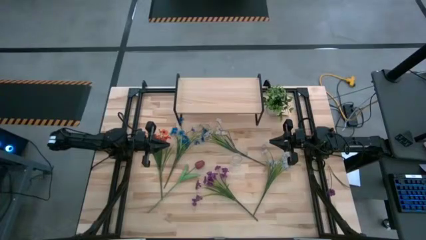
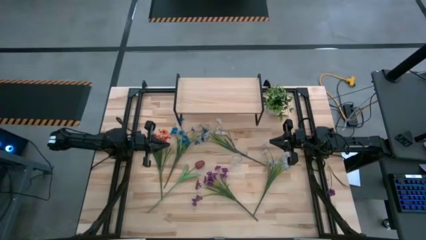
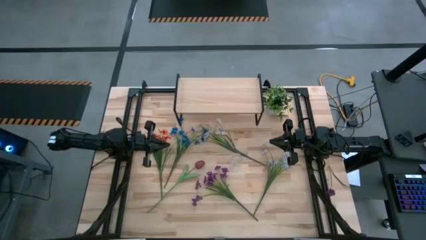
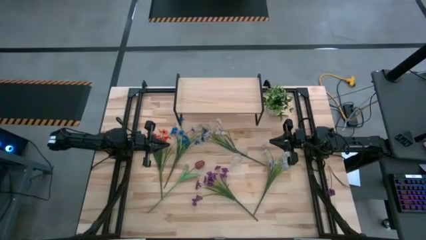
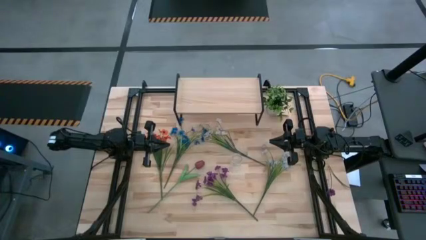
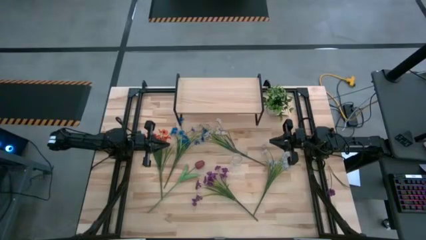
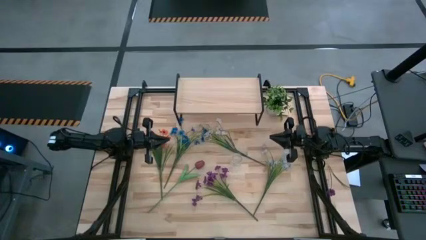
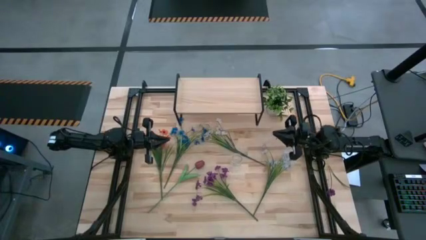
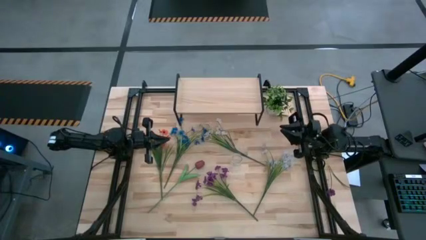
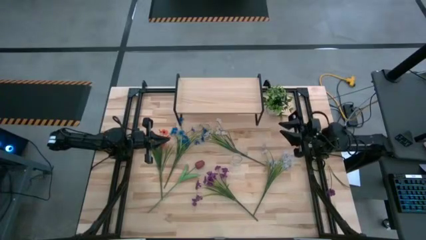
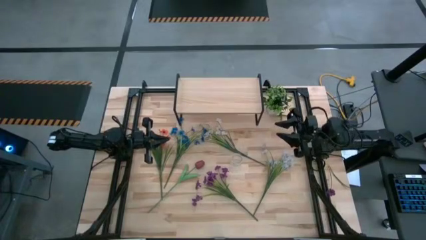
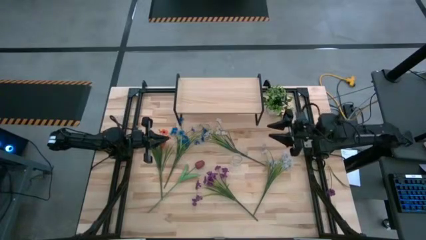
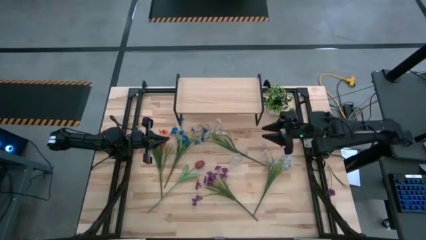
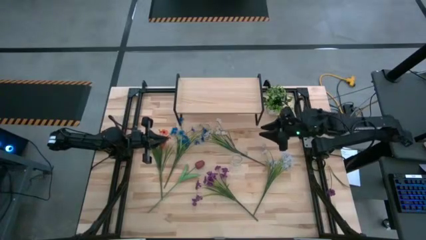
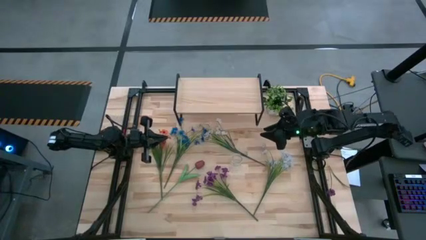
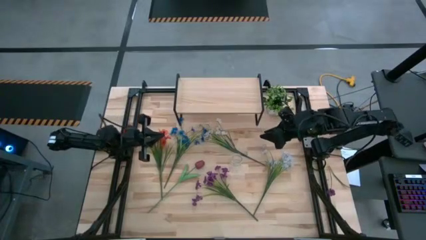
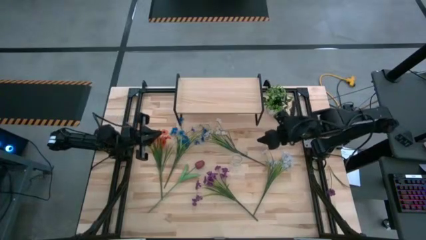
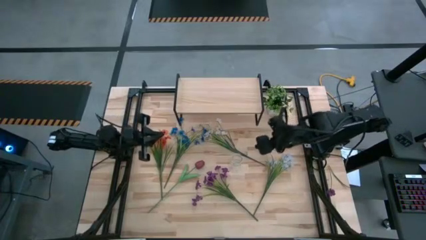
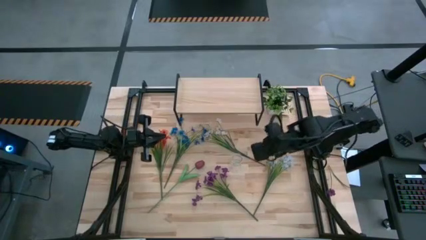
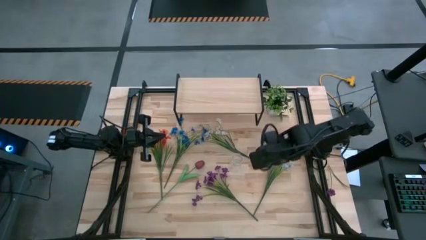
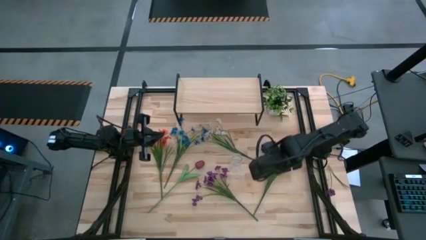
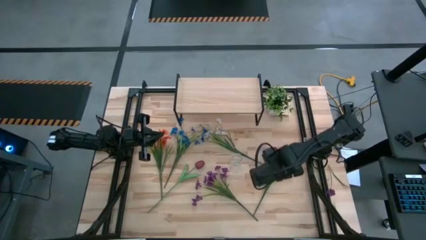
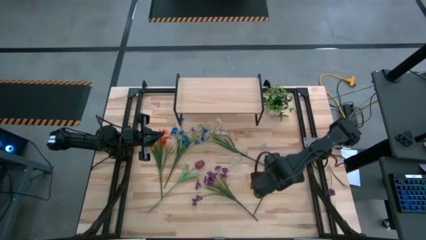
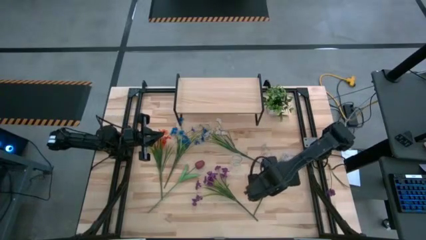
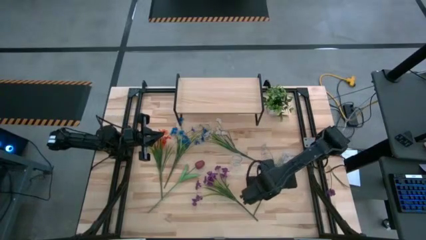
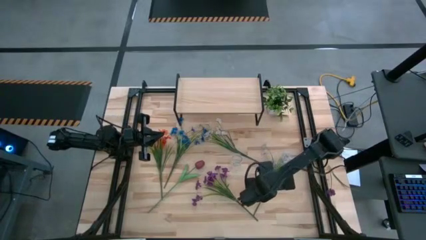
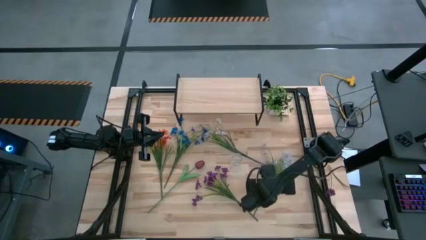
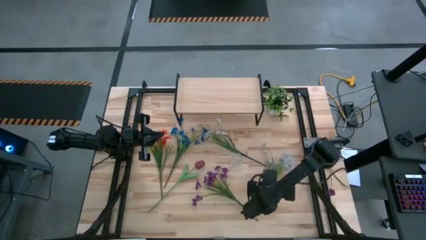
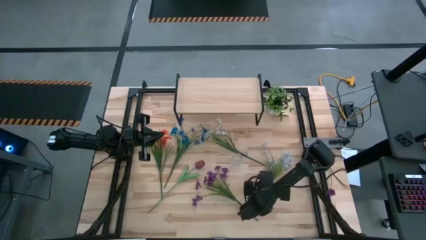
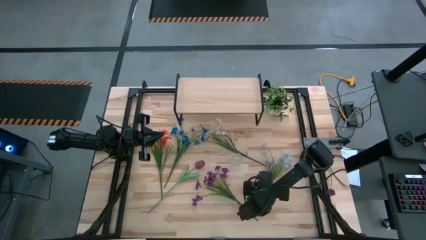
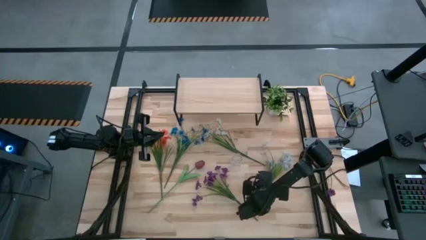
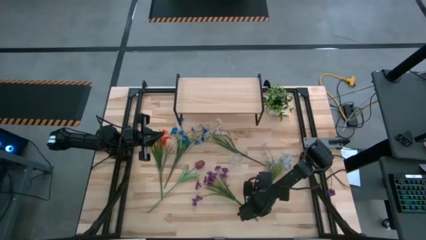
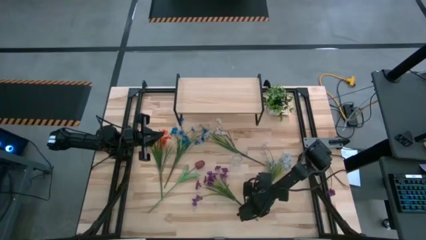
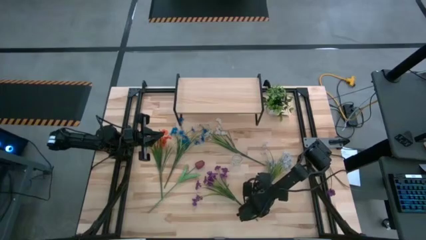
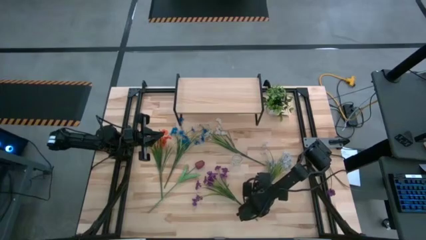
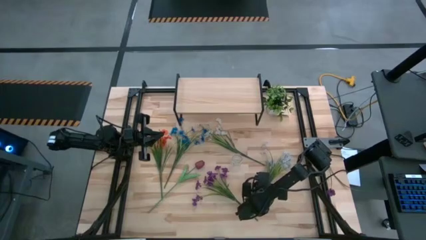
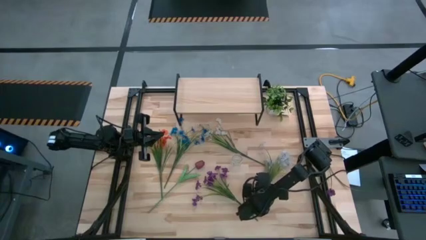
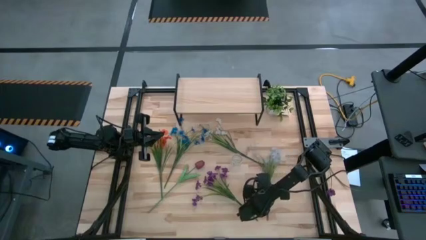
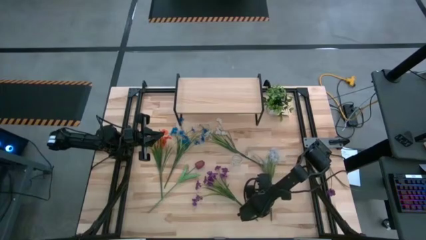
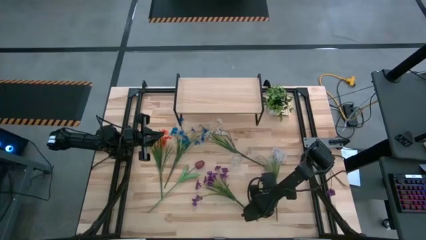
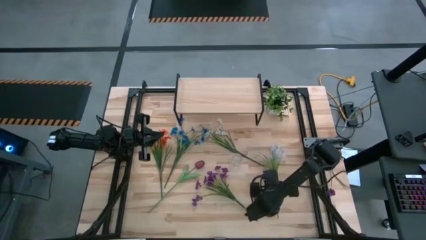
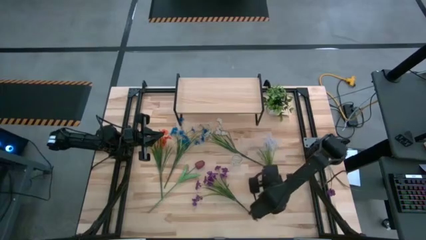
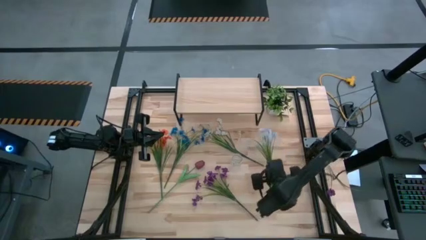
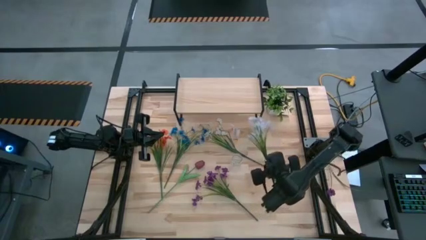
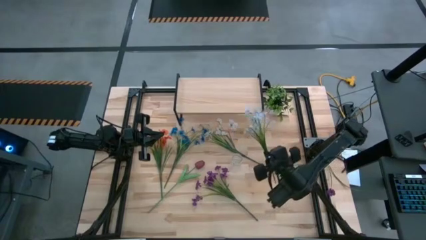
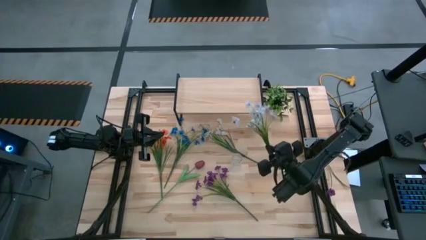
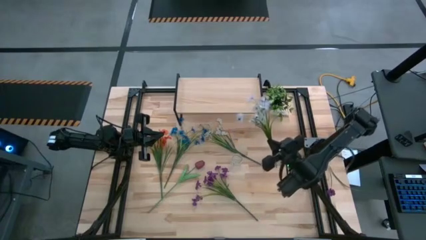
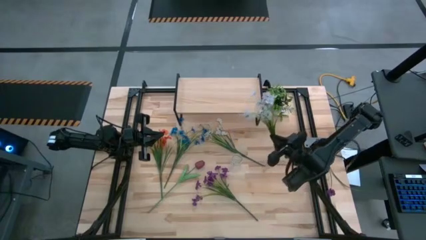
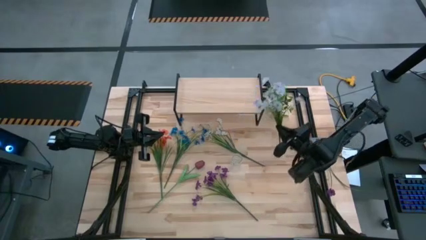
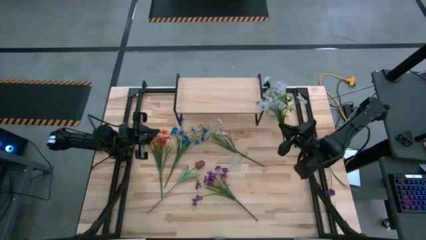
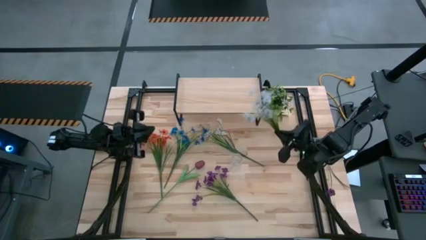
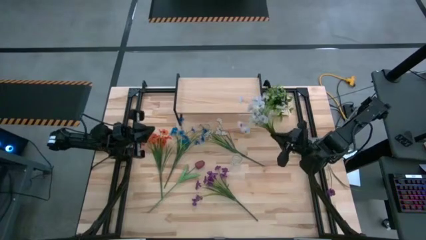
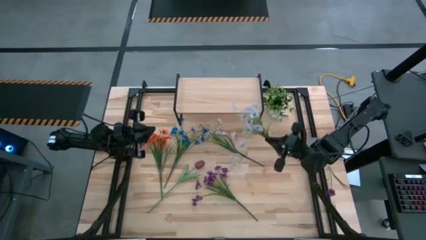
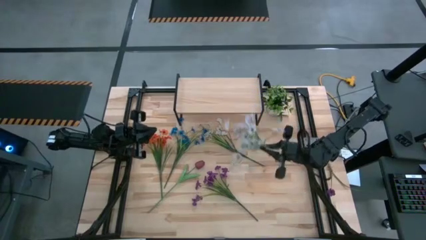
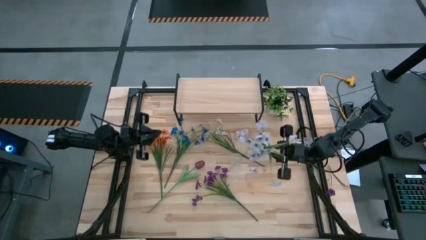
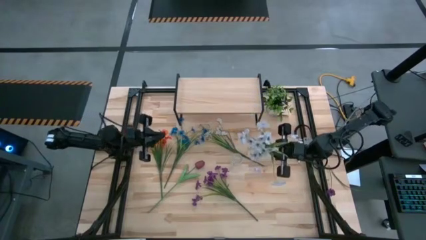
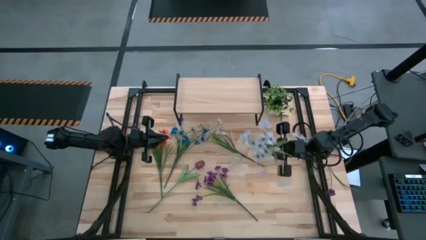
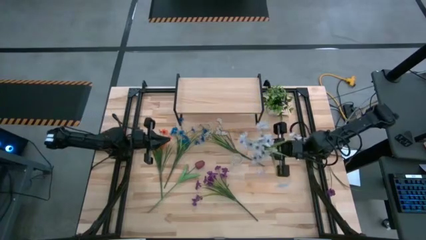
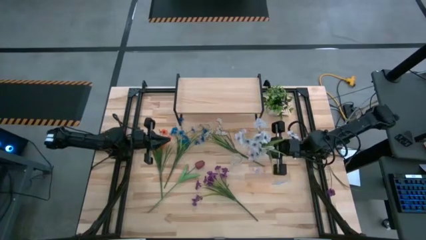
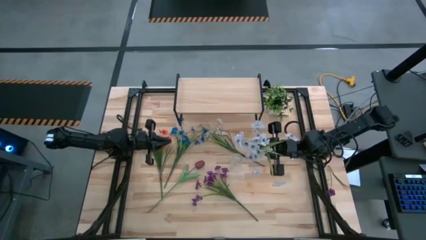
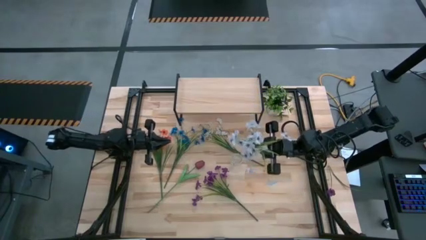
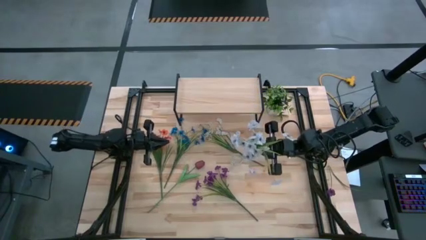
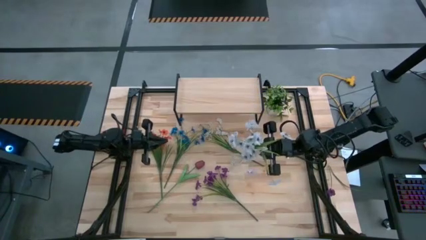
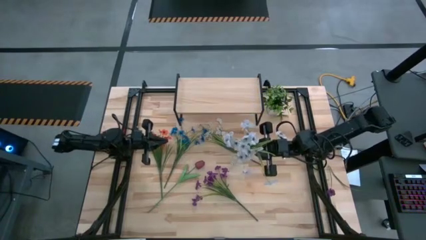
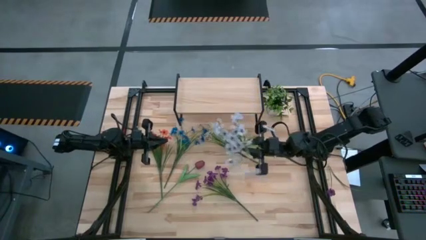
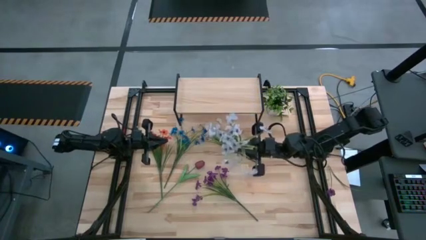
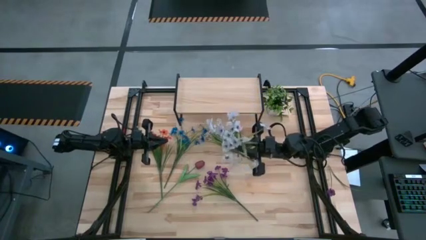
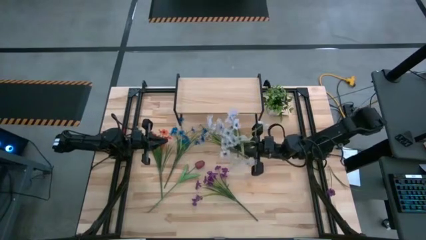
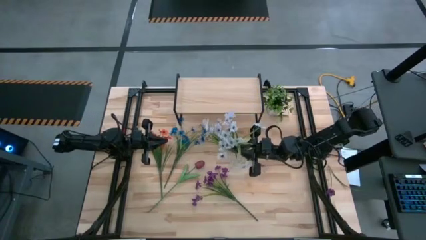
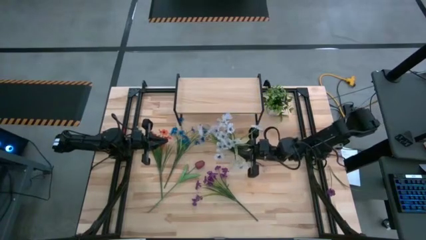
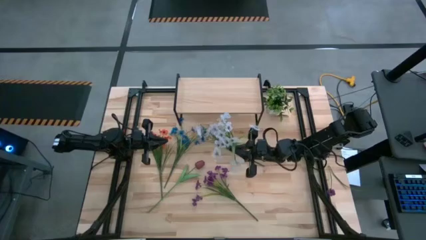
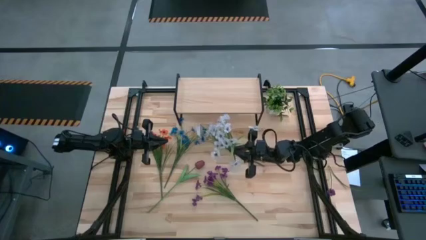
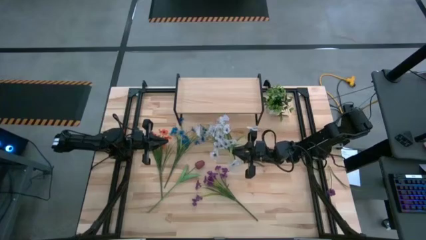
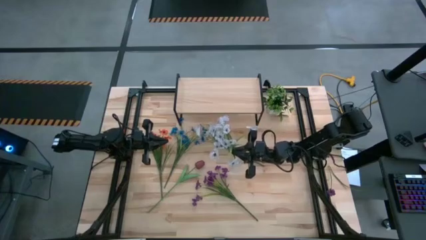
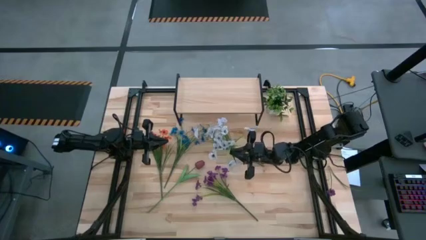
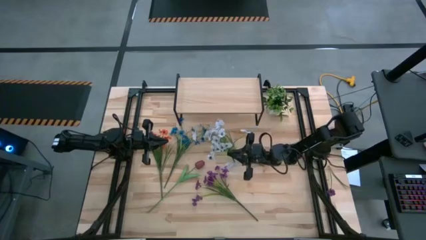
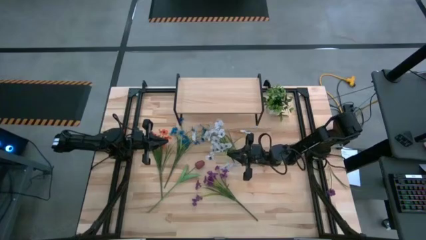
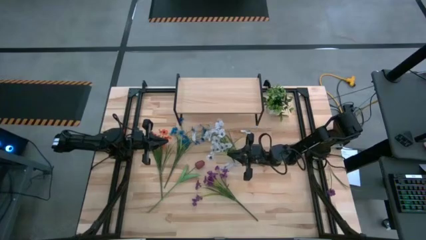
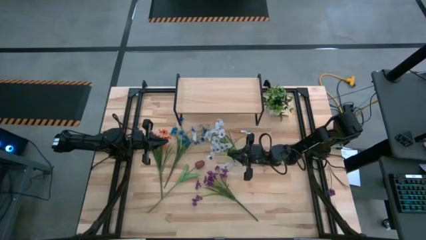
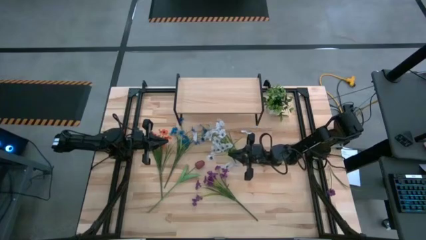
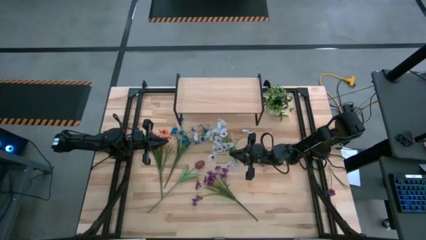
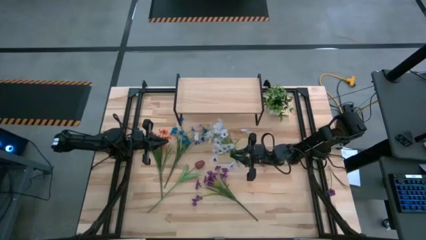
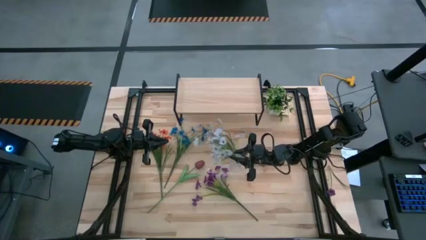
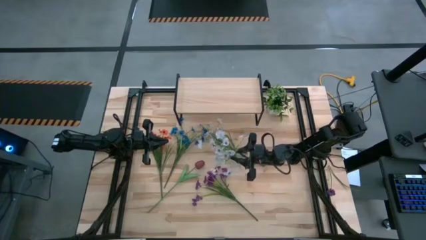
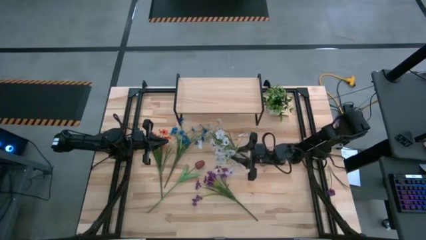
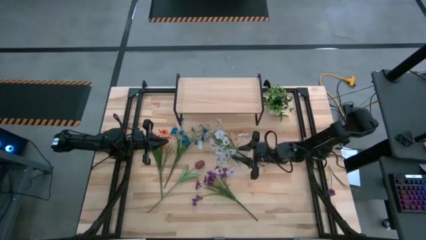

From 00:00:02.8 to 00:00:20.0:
Task: Pick and place flowers into a vace then onto a shelf
Put the right white flowers into the transparent vase
